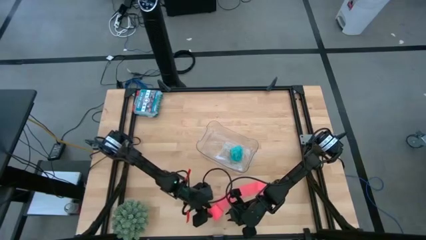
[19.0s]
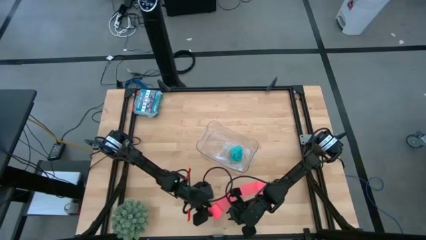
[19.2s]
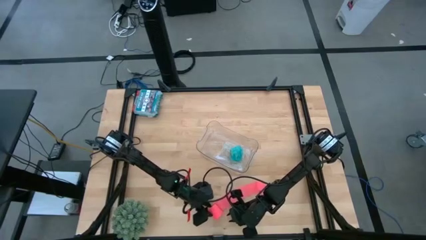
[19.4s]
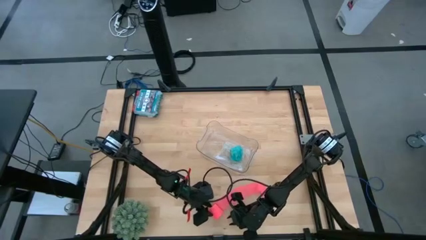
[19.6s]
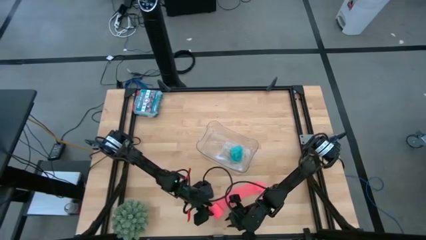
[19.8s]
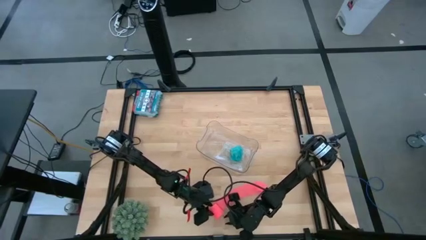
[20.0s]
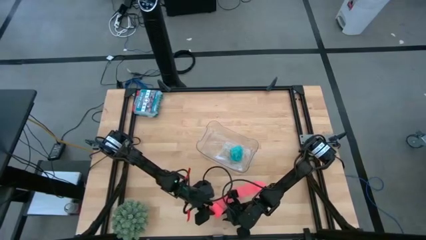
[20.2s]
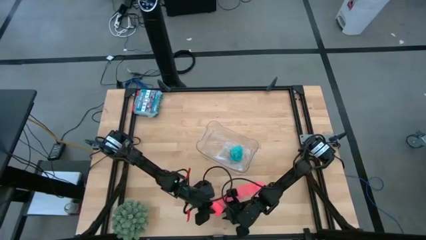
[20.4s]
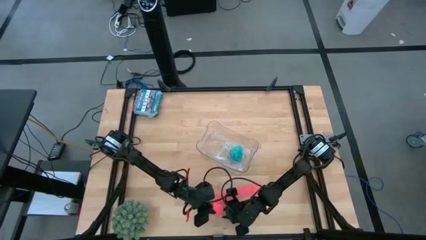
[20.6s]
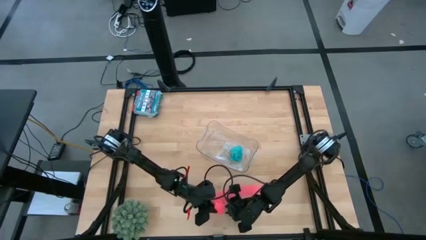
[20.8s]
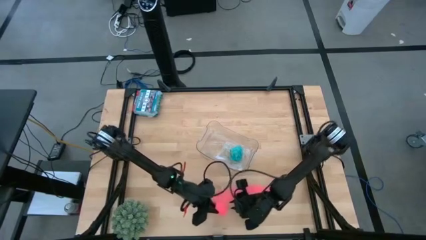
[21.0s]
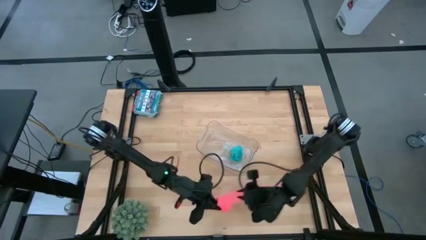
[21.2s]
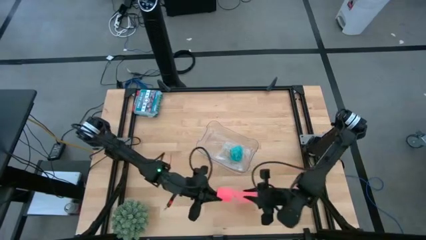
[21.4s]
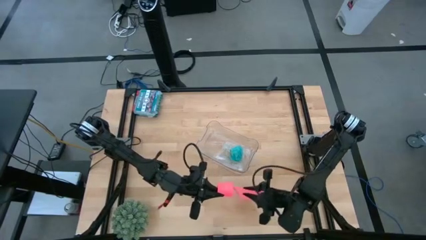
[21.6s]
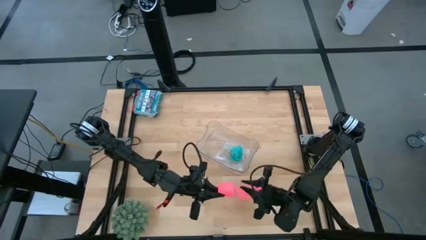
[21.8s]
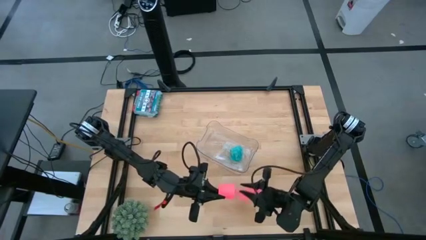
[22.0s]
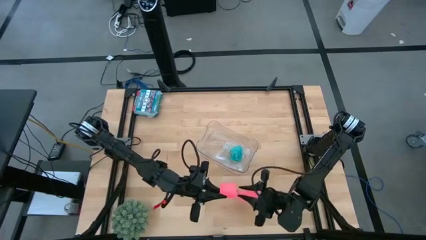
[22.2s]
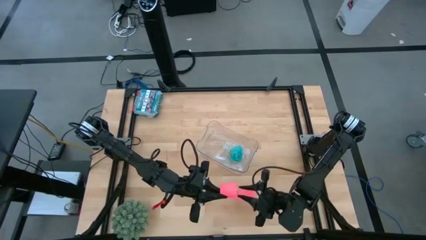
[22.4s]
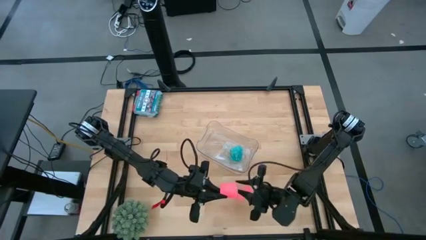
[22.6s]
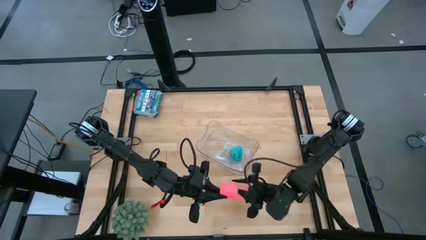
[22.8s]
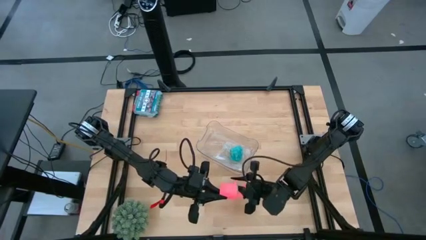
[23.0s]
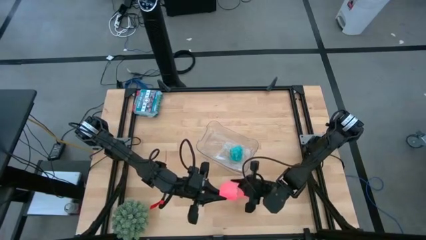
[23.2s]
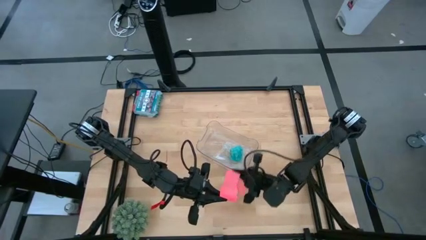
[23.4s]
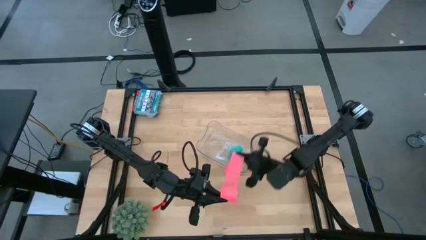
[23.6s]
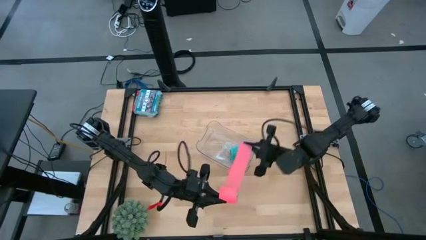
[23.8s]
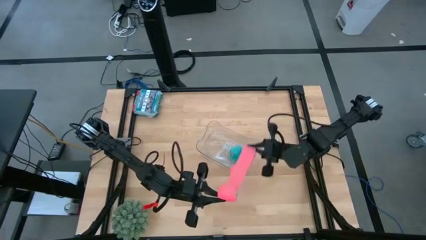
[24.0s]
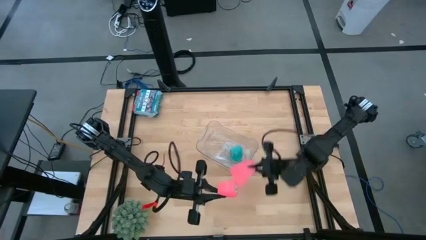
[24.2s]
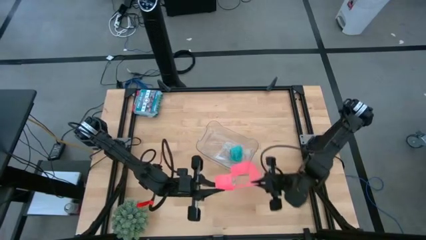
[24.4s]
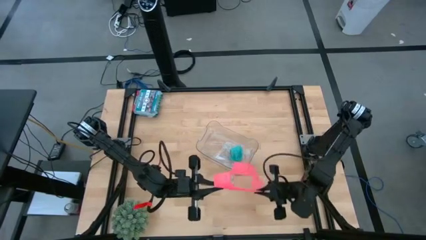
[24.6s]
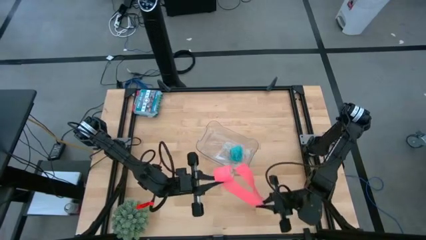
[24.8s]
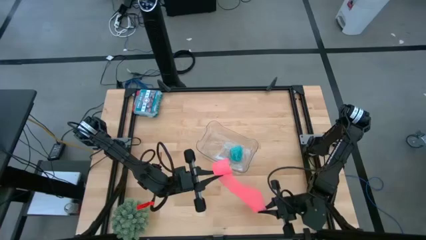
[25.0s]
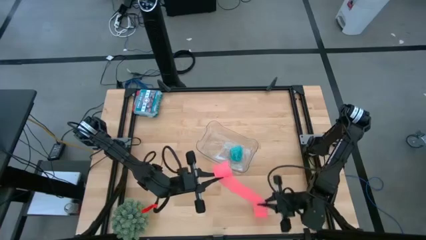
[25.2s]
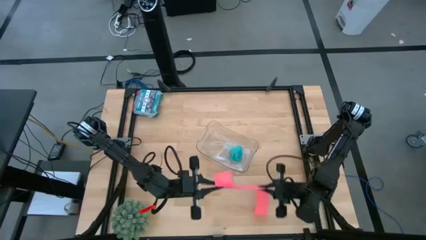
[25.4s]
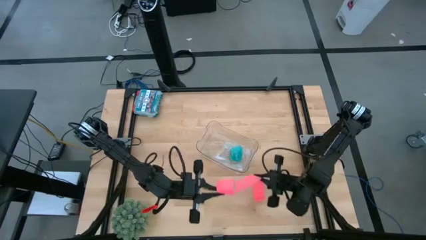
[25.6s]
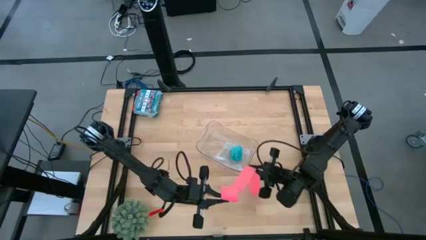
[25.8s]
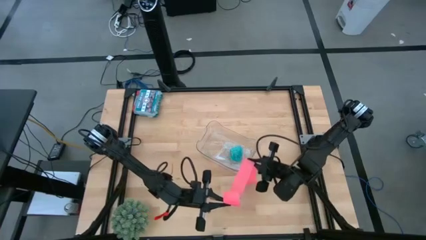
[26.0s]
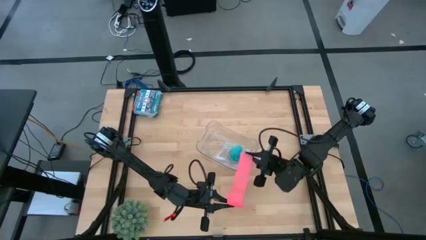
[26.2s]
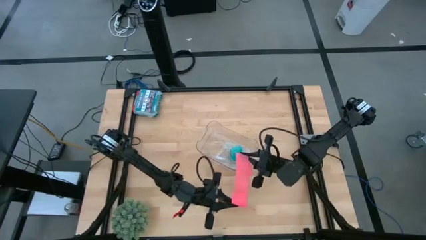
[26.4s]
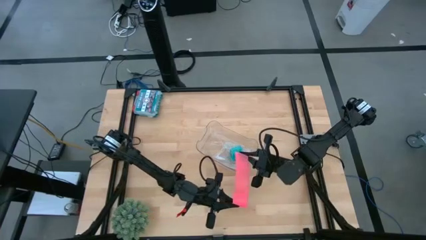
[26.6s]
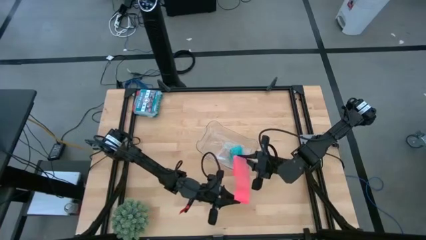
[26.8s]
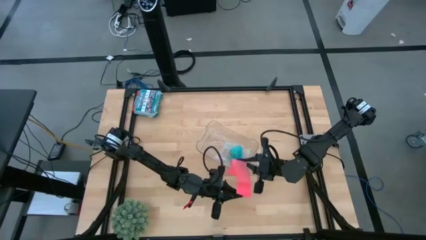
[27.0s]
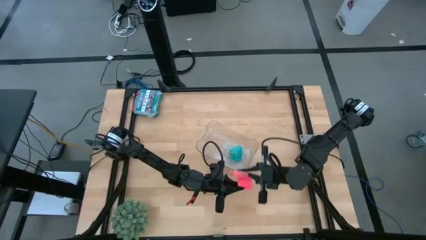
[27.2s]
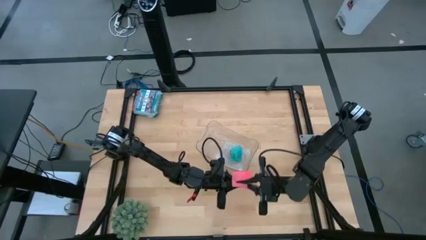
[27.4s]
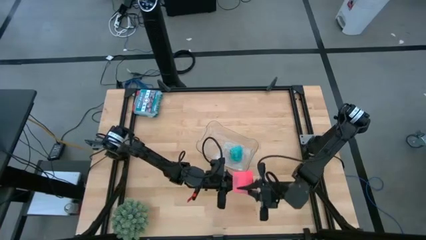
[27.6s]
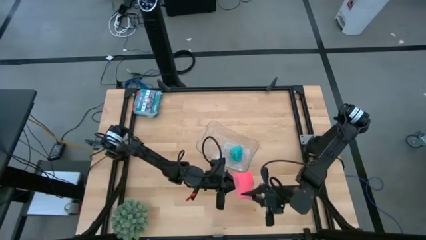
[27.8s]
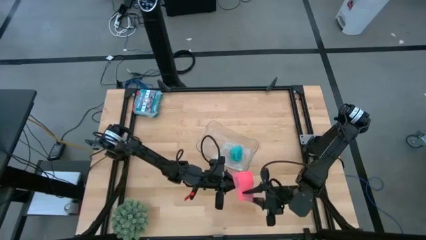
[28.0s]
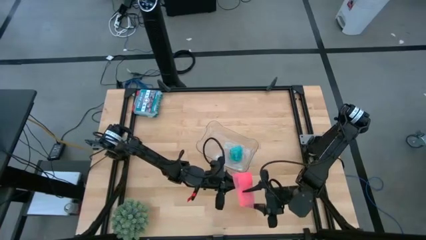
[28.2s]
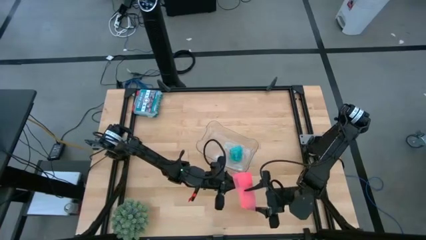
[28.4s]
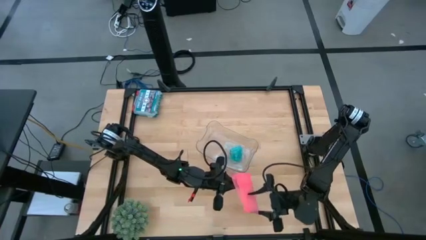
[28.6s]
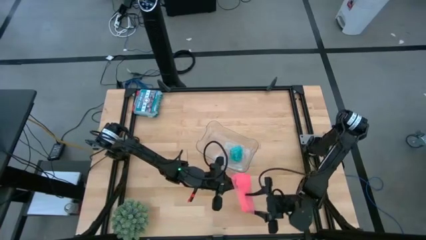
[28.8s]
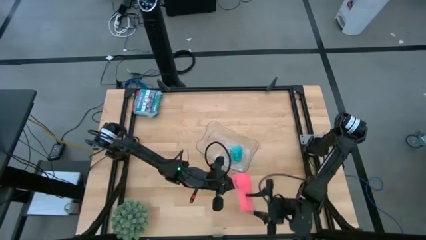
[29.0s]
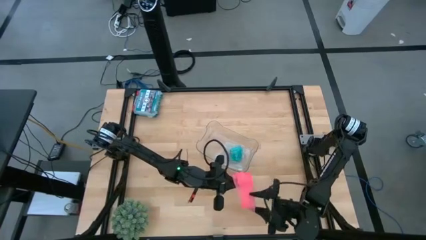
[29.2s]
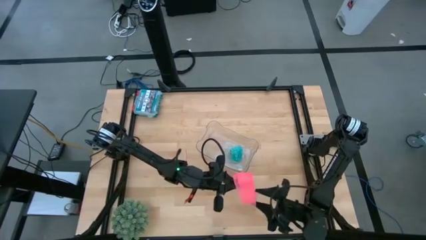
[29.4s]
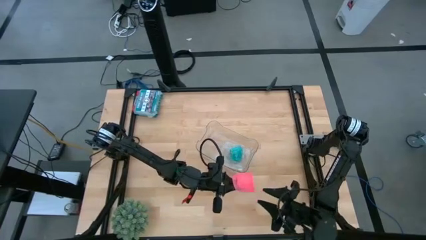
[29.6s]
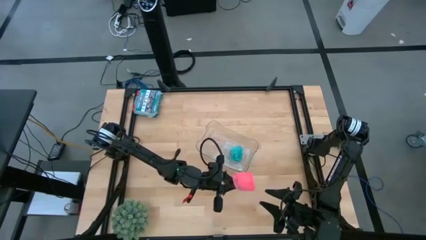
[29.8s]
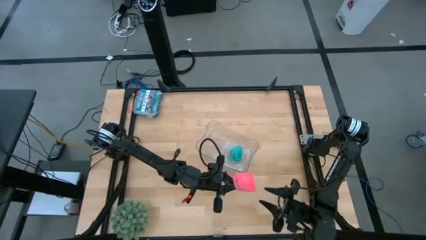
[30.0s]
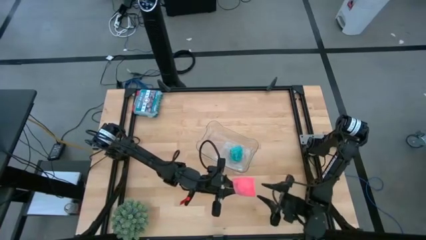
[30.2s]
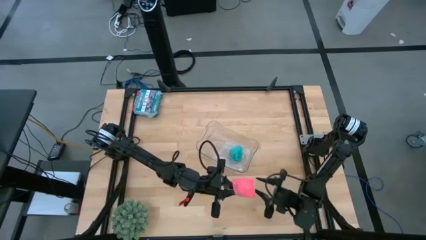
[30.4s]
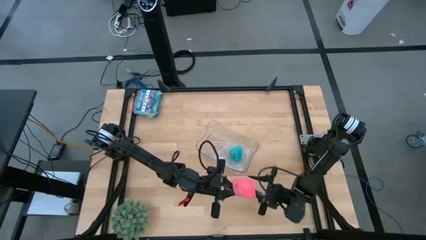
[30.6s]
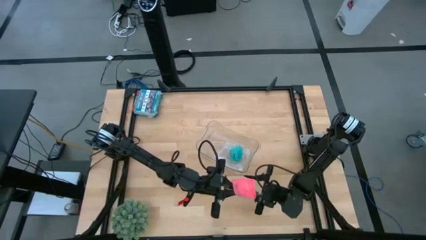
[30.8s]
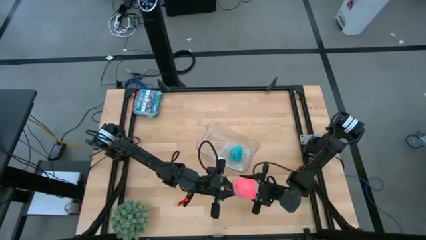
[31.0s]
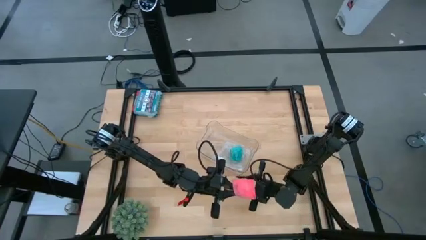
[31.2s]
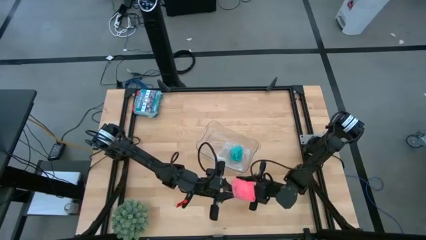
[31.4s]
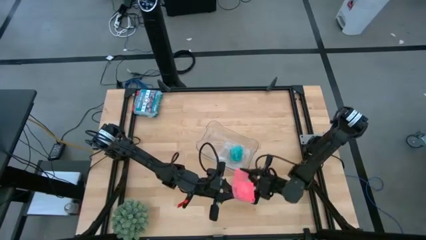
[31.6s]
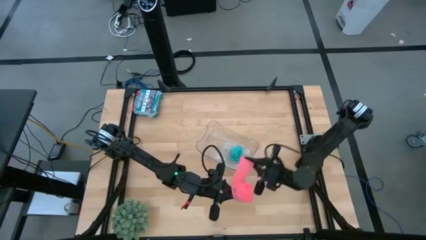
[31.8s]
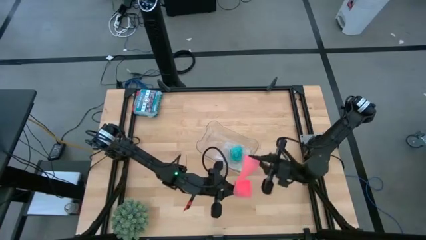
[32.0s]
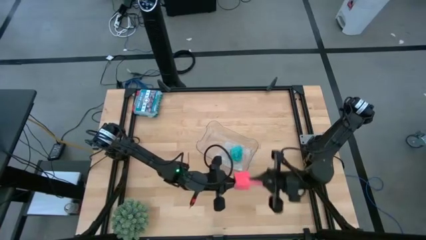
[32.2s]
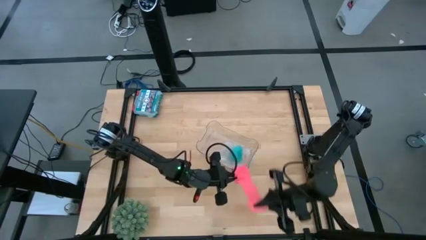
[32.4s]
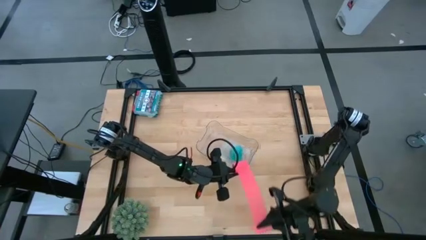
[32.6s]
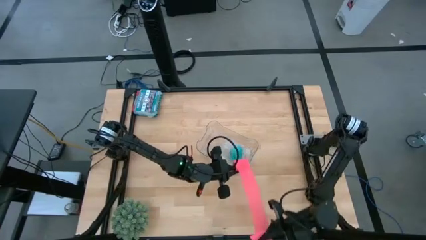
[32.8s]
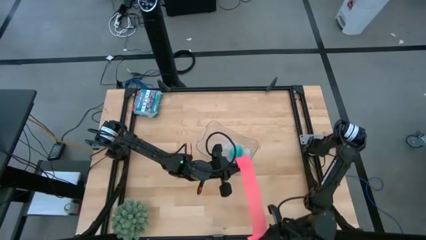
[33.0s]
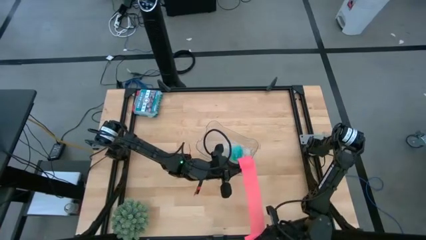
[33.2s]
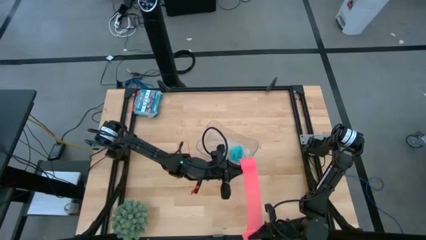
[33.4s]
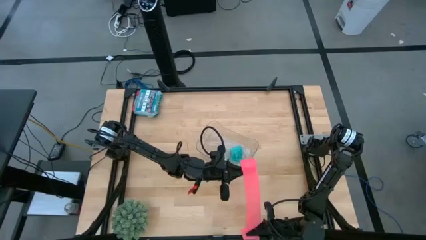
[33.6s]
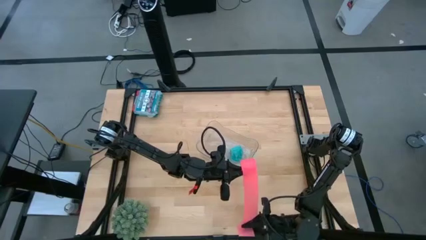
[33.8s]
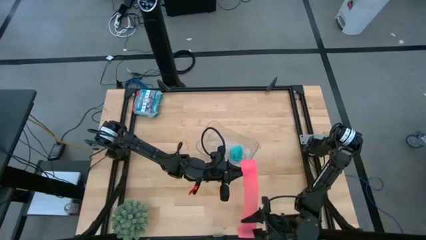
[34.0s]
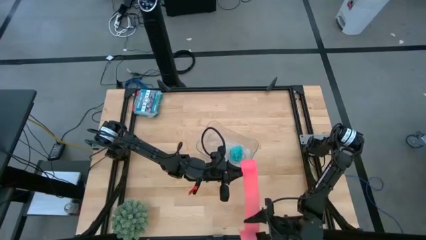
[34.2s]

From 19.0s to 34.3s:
Task: Roll bandage
Roll the pink bandage
